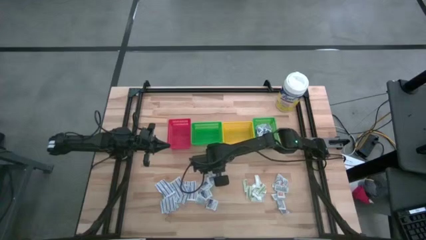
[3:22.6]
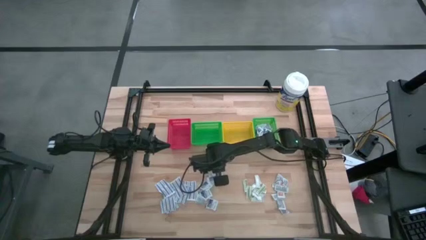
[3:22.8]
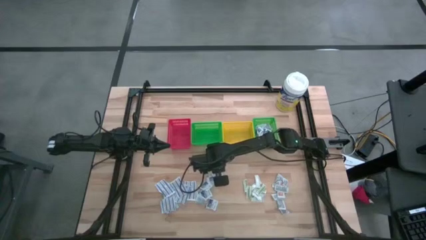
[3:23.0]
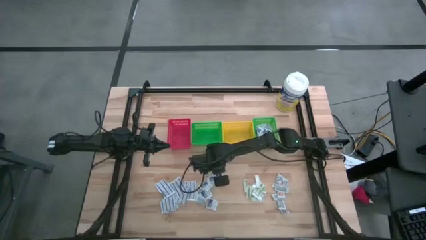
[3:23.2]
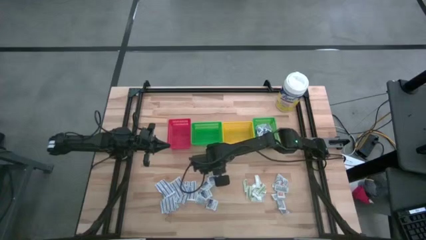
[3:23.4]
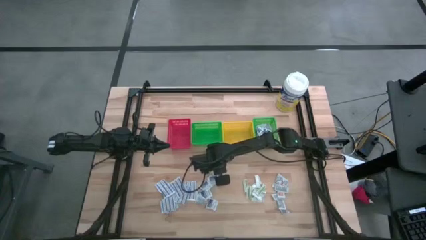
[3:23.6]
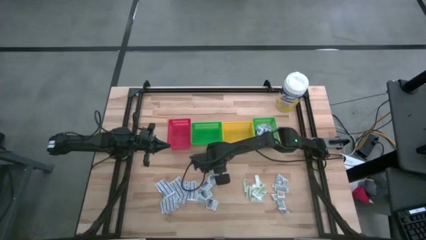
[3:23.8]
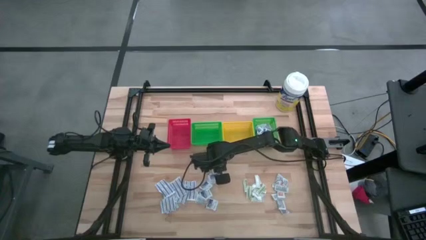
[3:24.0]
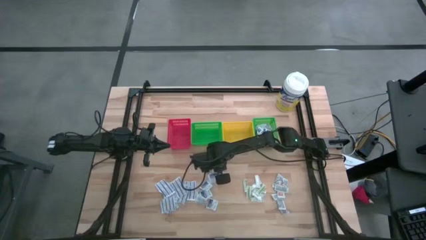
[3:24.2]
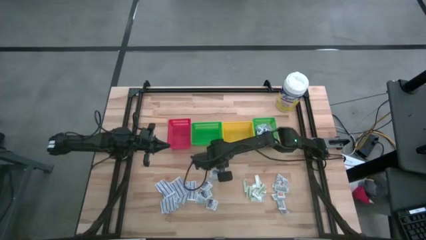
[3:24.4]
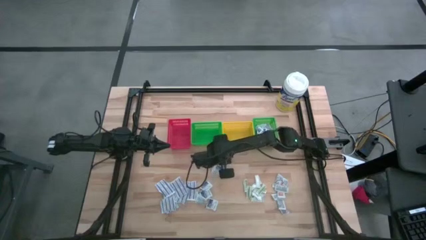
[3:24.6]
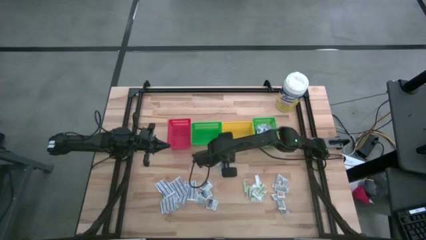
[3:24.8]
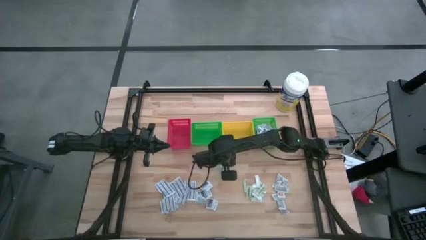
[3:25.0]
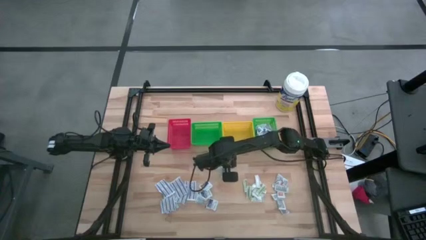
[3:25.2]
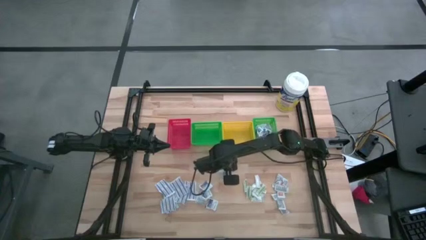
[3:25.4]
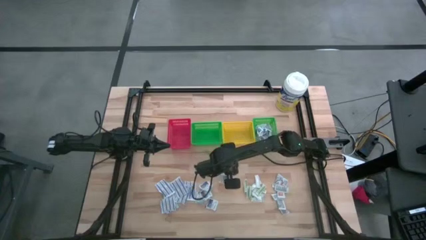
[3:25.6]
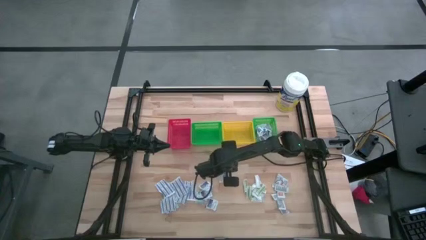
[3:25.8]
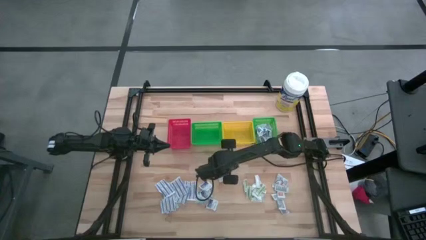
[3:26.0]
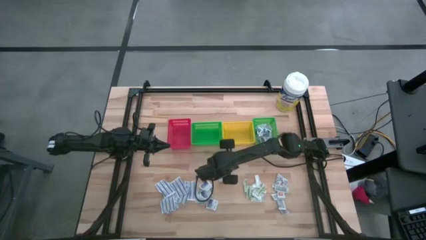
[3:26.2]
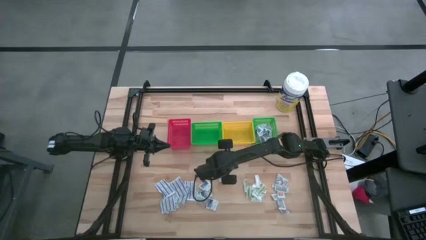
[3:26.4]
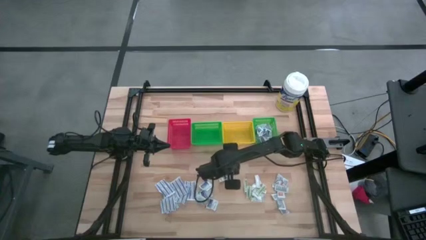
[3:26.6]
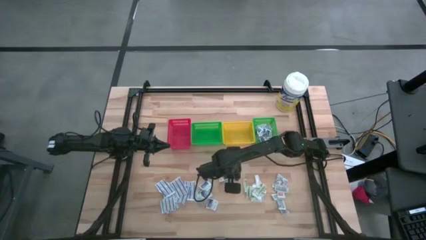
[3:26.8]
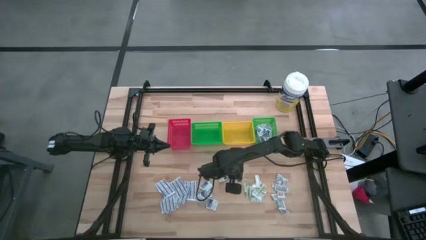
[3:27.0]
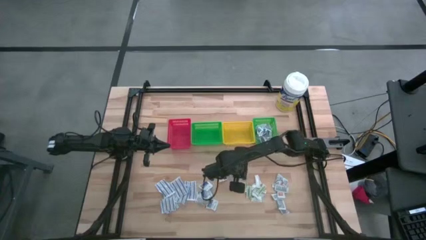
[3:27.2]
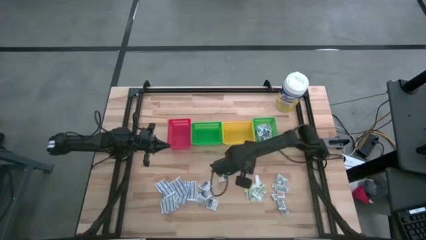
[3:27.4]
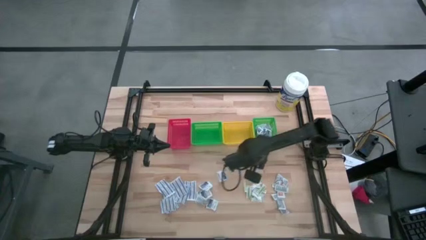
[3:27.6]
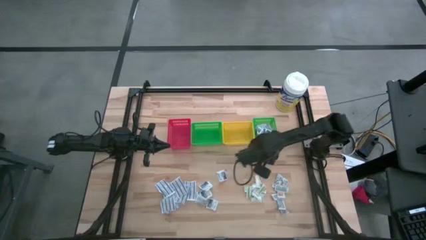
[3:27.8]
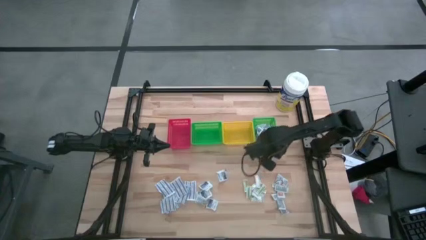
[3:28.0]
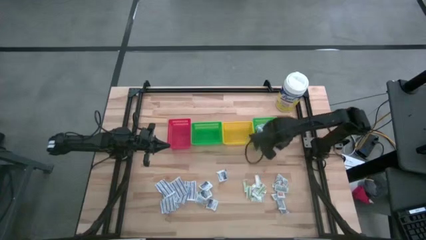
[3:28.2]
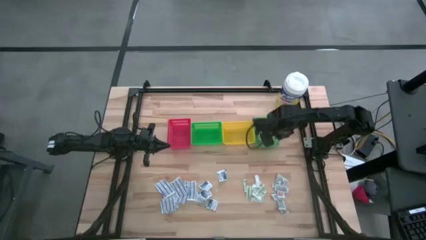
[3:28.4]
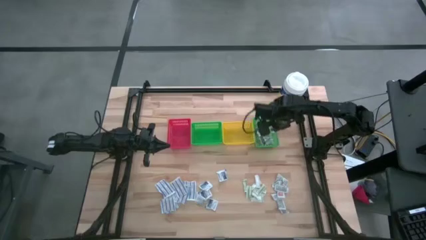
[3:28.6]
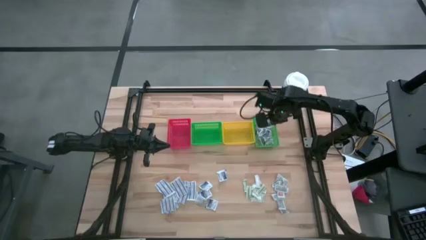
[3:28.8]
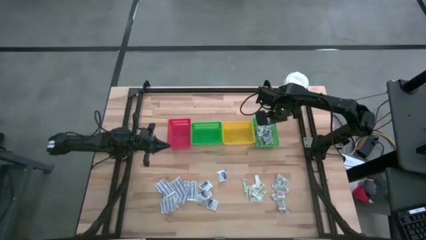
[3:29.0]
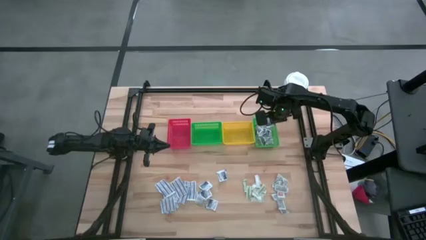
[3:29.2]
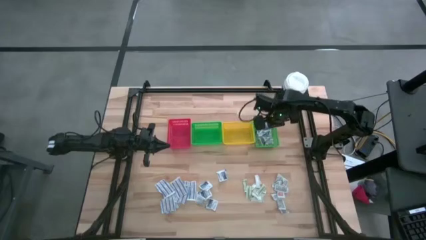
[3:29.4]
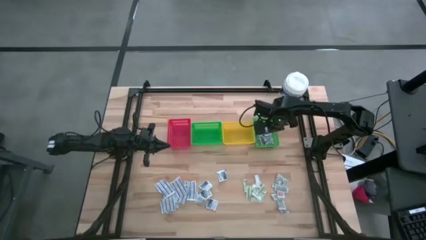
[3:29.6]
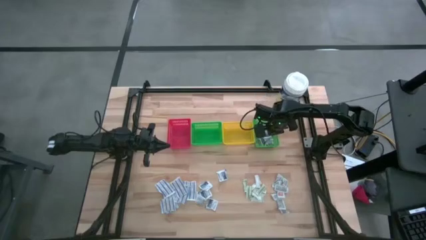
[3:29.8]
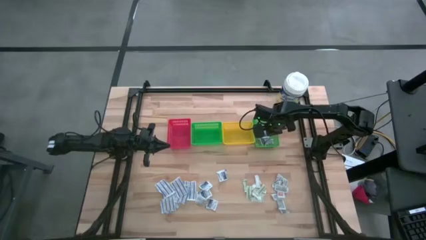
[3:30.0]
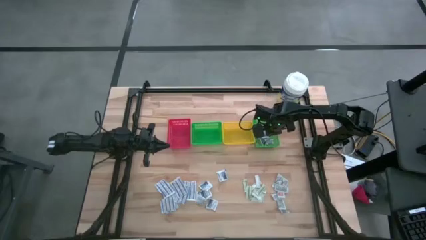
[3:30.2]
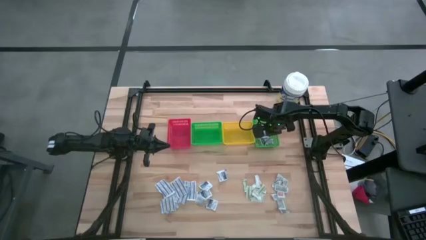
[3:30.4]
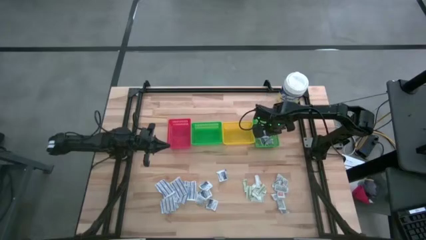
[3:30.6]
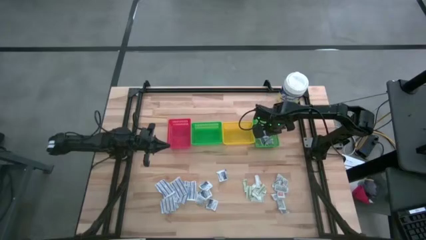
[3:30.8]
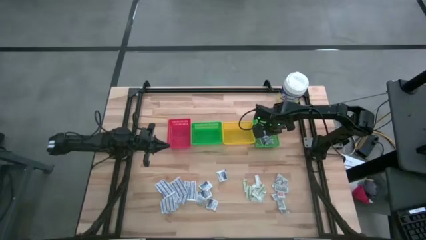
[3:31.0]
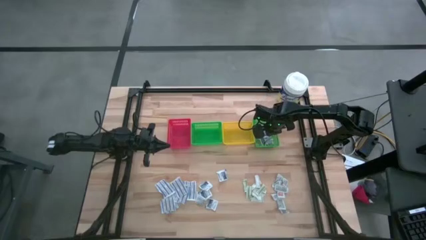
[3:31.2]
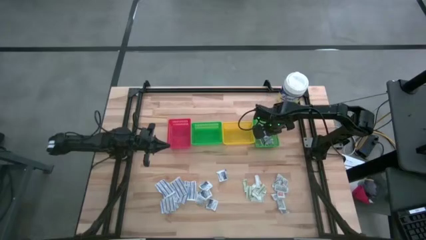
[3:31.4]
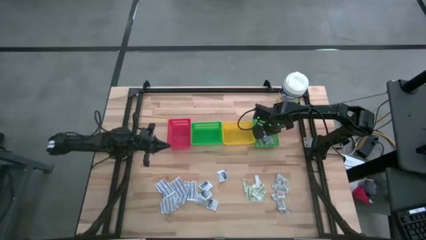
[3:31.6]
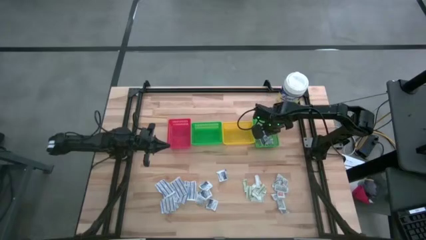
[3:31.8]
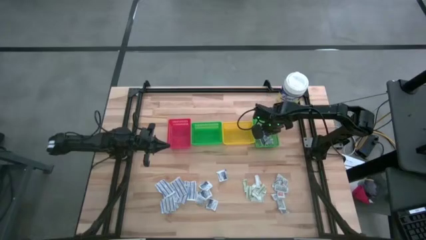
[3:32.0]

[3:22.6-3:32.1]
Task: Pick & Place First Aid Supplies
Put the blue alcohol pad into the right green bin
